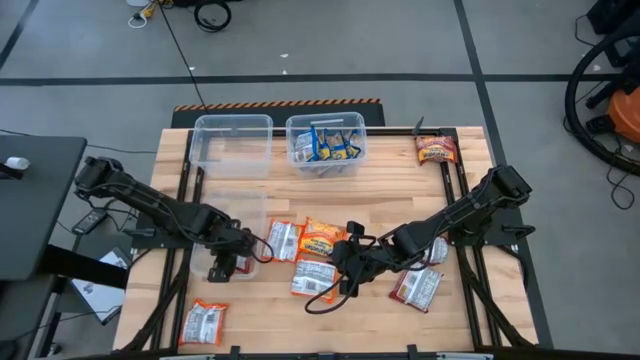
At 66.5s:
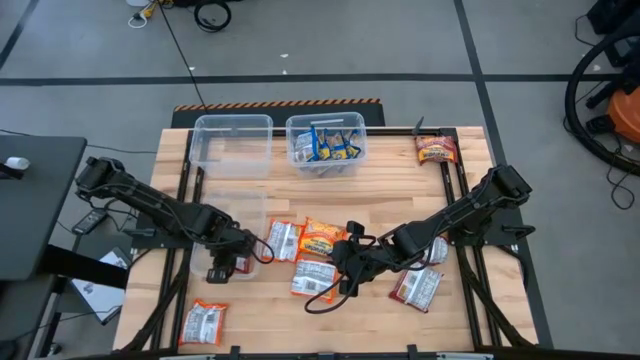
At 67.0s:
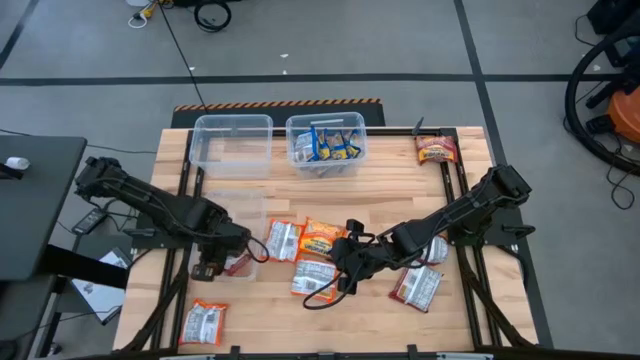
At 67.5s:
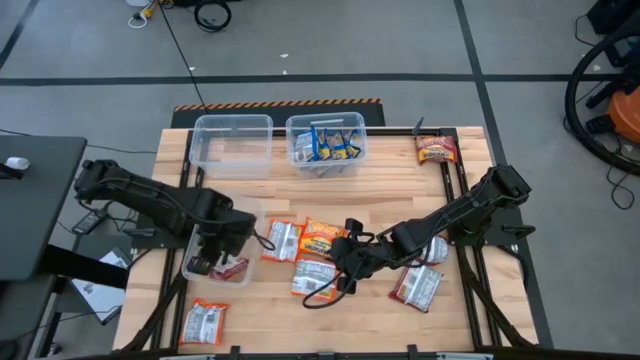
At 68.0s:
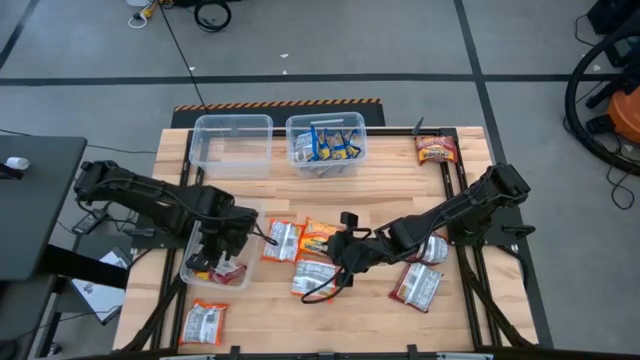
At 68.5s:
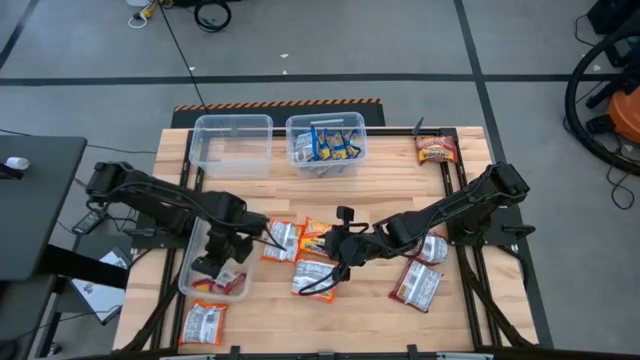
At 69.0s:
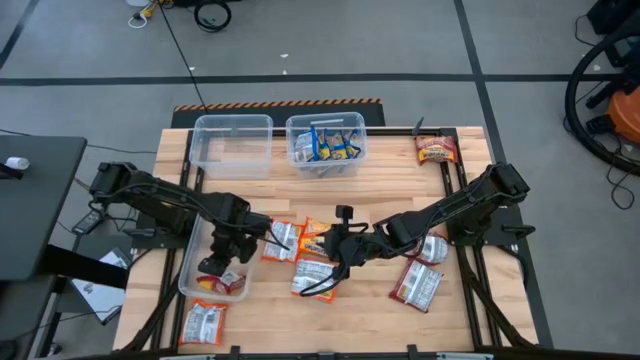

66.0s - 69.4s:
Task: Sort Maruchan noodles
Put the bottom right red noodle pack into the bottom left transparent bin

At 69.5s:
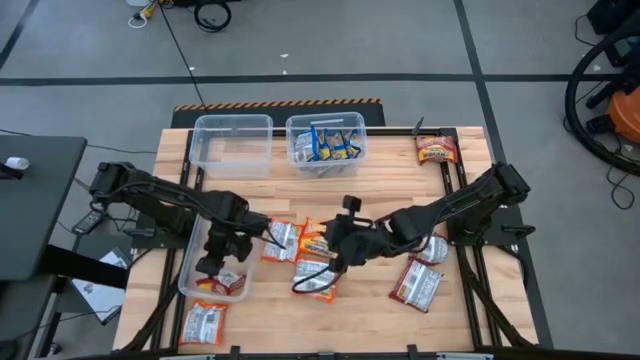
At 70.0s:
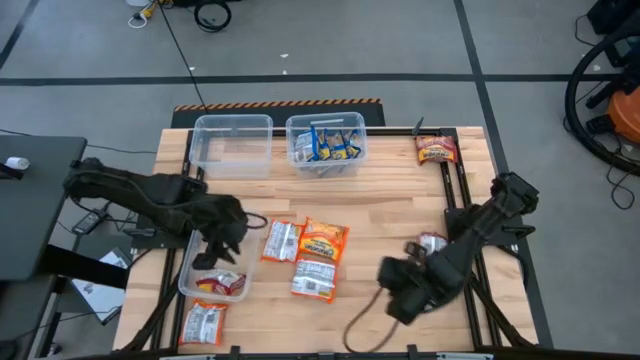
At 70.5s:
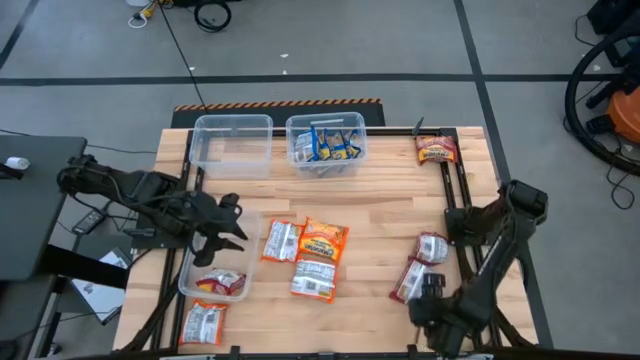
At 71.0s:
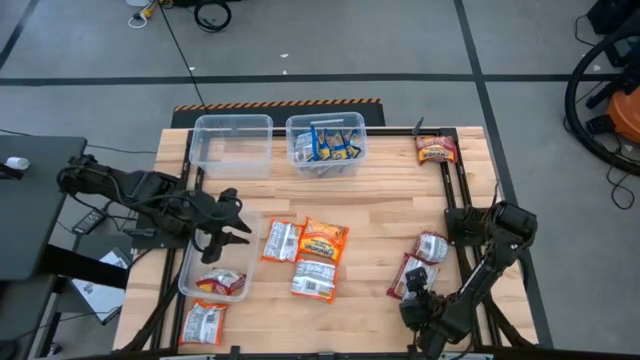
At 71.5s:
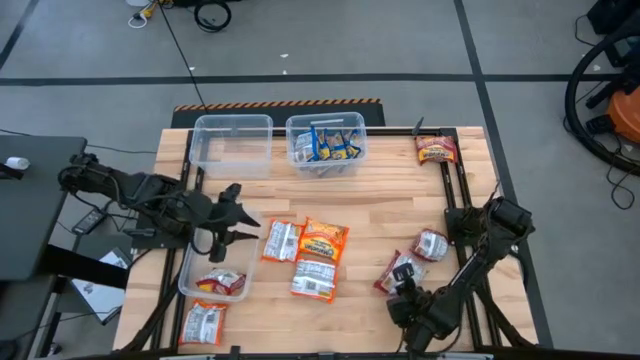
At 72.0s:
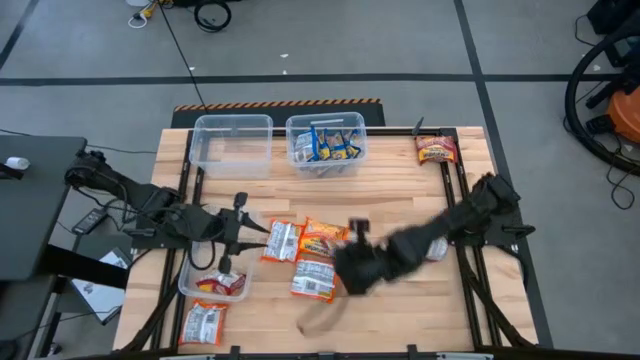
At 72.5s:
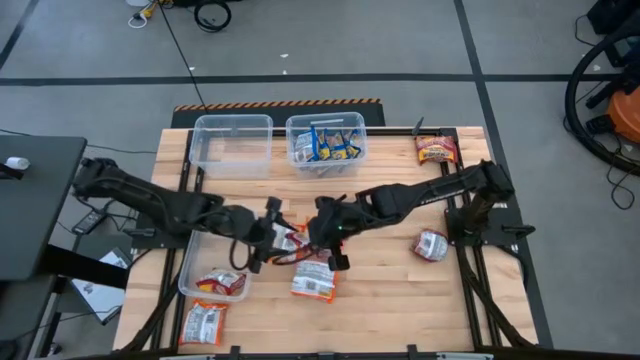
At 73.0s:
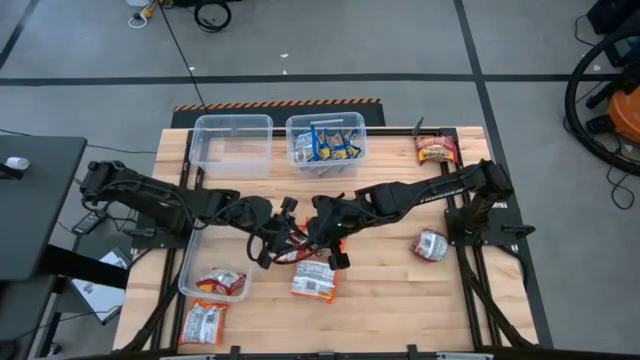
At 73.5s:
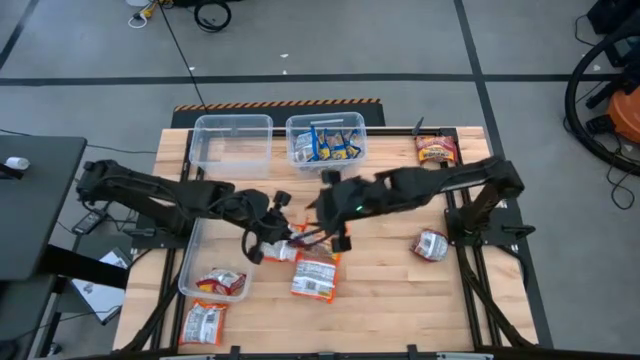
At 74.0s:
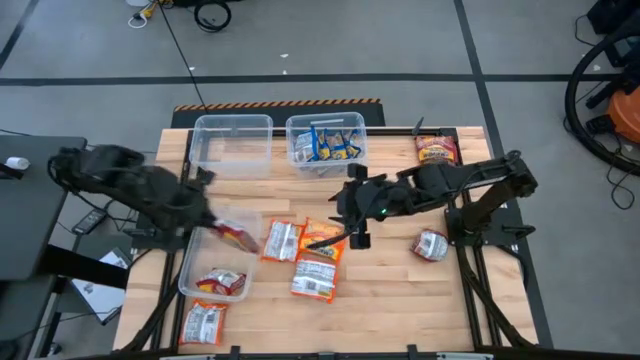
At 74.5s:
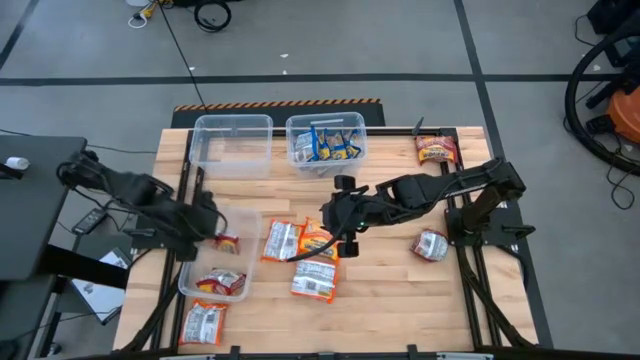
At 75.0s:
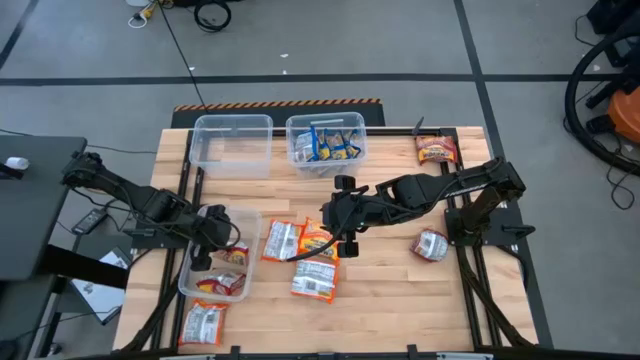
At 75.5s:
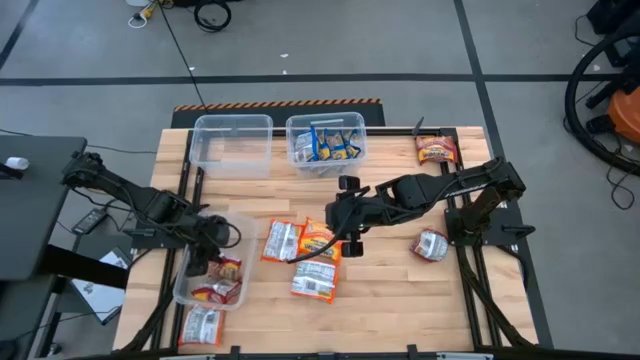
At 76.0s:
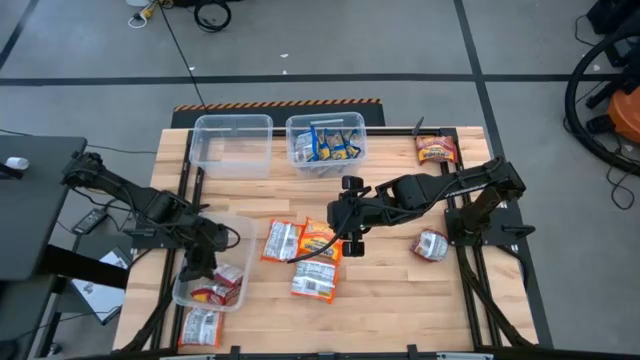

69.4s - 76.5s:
Put the bottom red noodle pack into the bottom left transparent bin

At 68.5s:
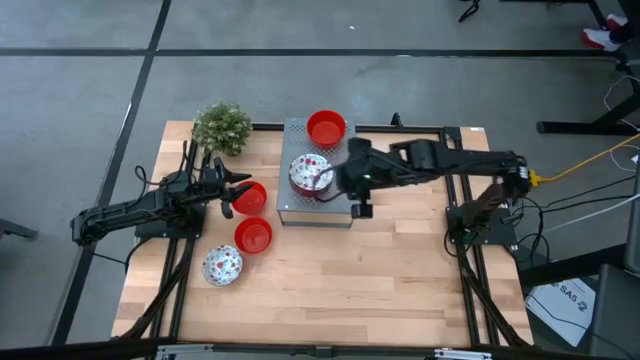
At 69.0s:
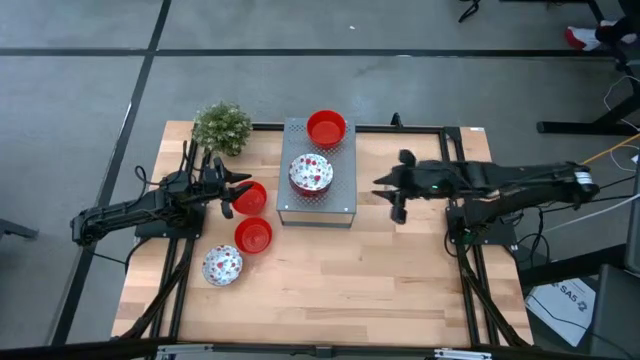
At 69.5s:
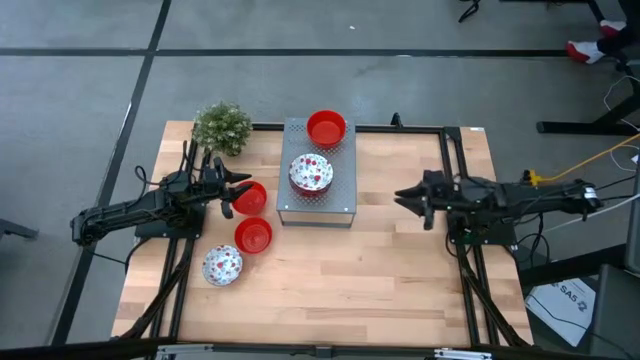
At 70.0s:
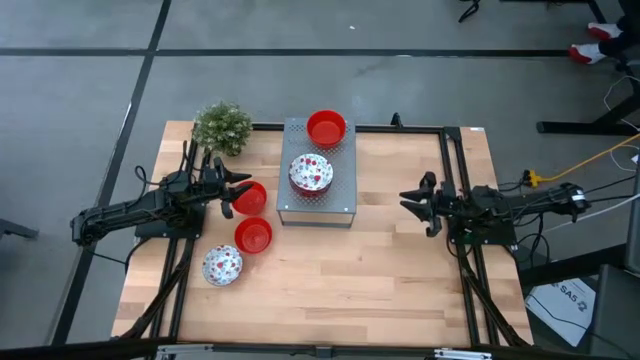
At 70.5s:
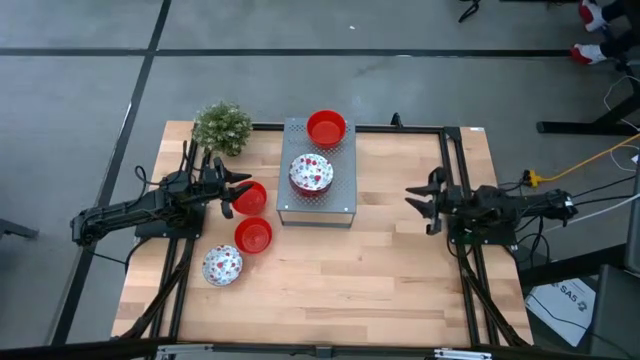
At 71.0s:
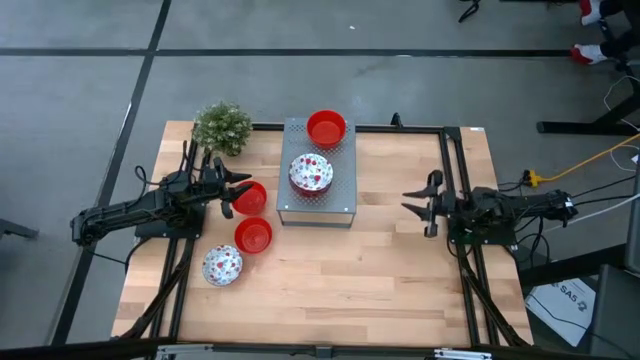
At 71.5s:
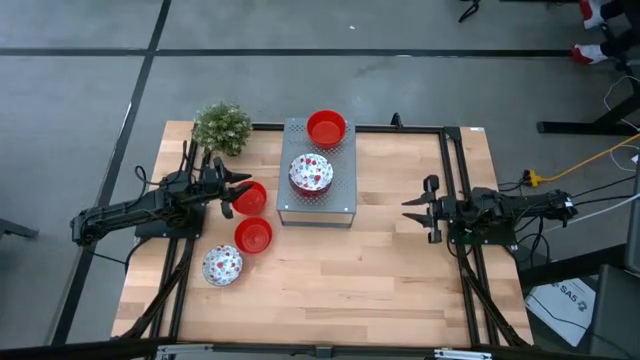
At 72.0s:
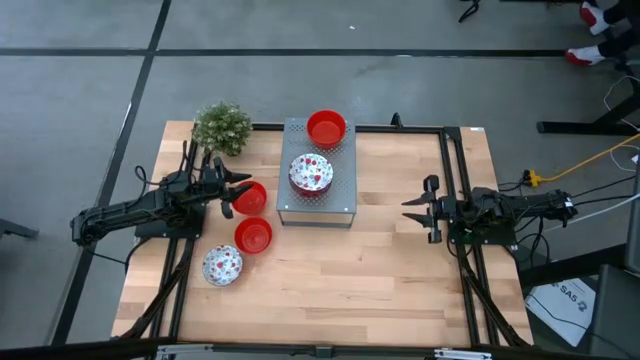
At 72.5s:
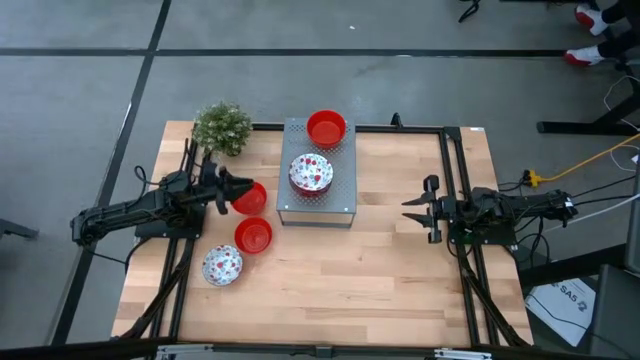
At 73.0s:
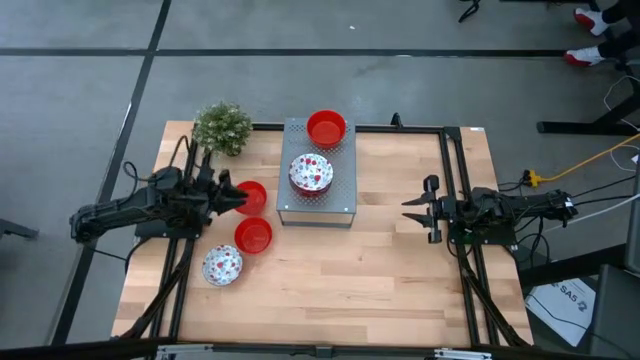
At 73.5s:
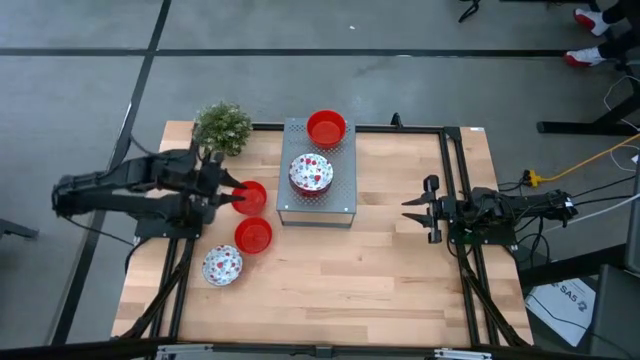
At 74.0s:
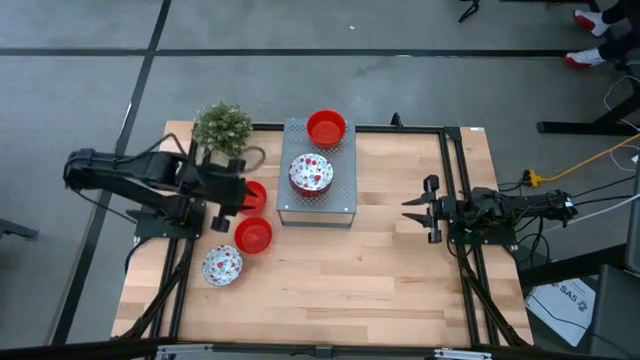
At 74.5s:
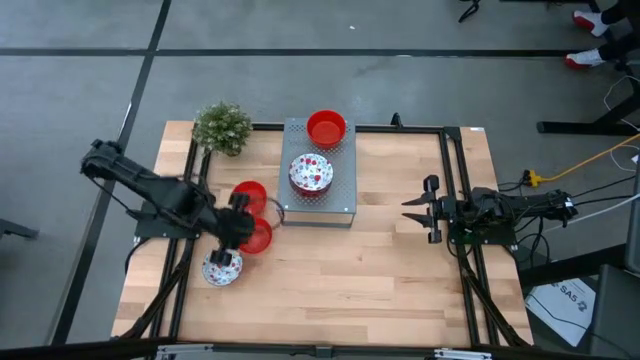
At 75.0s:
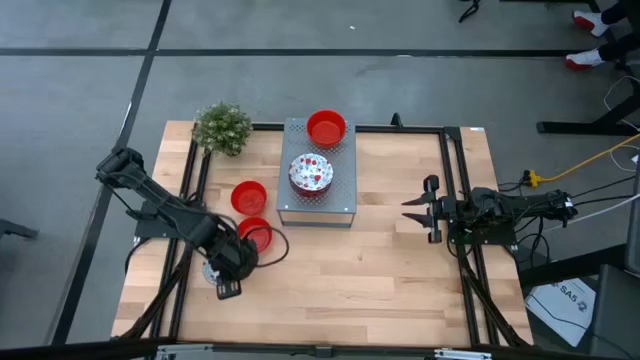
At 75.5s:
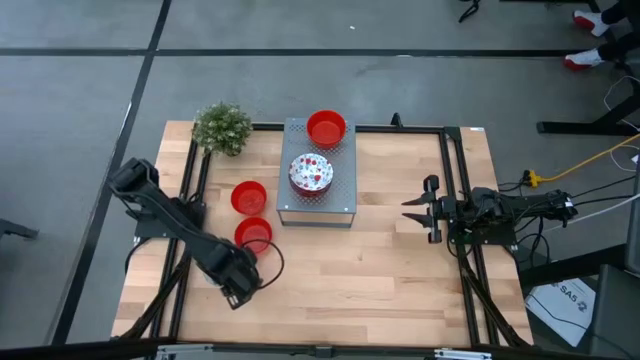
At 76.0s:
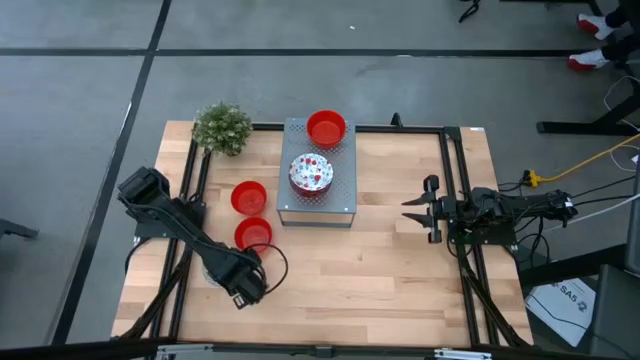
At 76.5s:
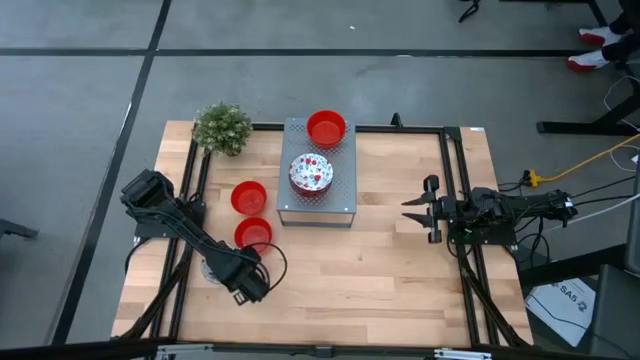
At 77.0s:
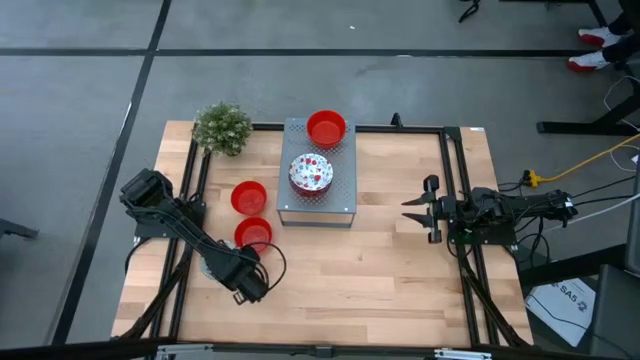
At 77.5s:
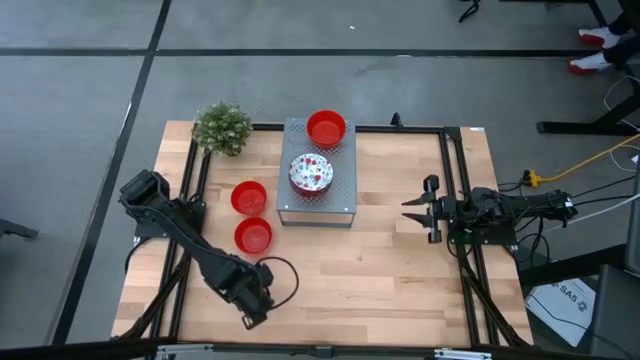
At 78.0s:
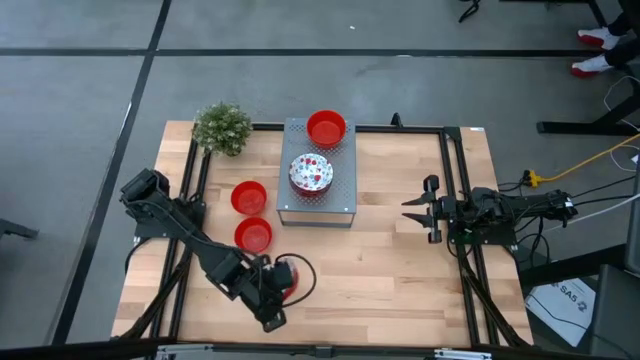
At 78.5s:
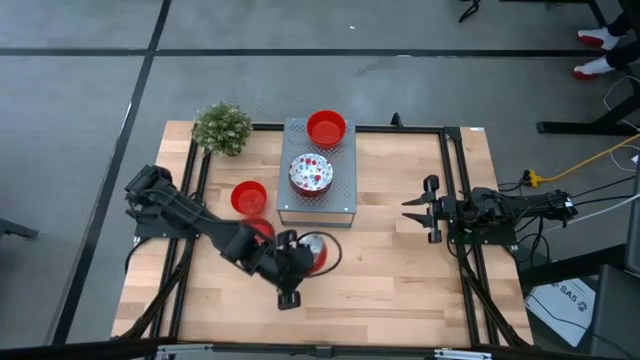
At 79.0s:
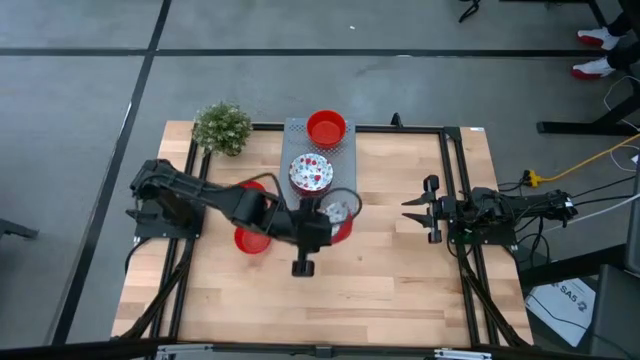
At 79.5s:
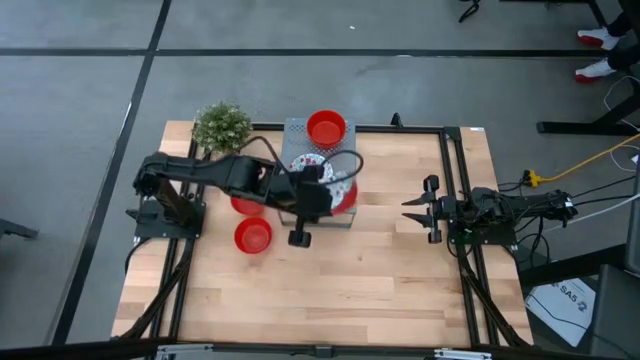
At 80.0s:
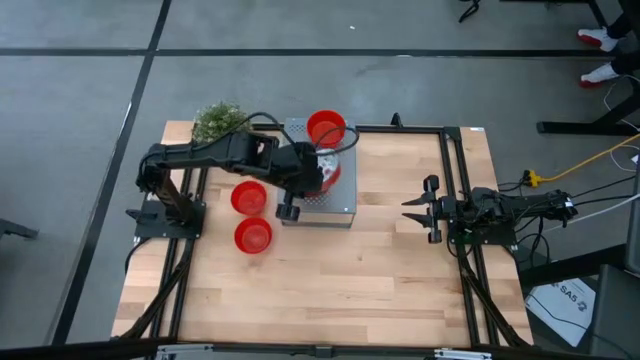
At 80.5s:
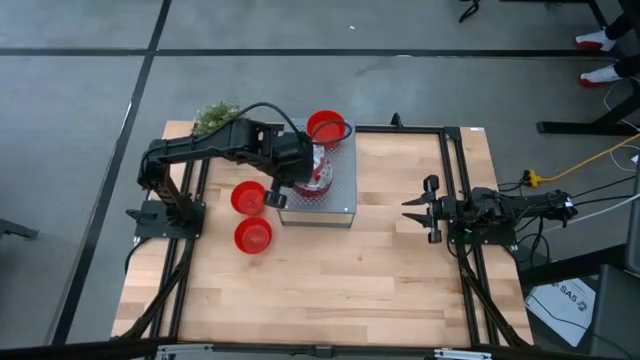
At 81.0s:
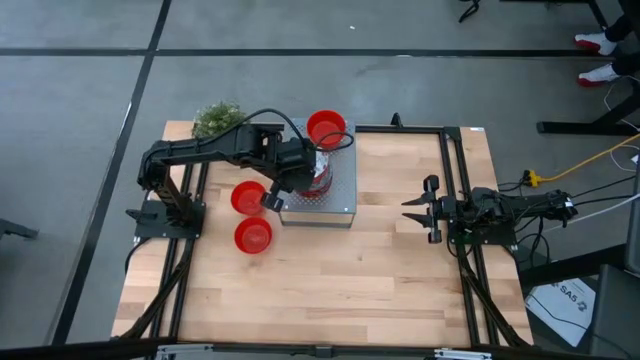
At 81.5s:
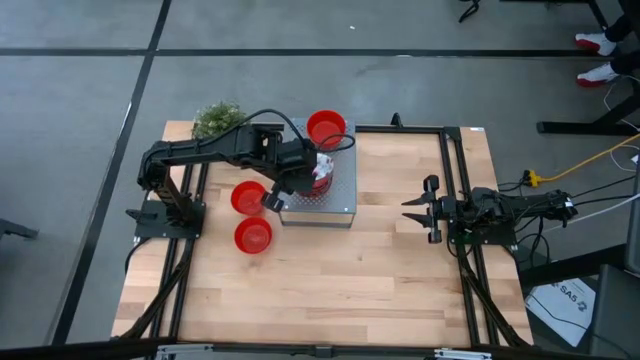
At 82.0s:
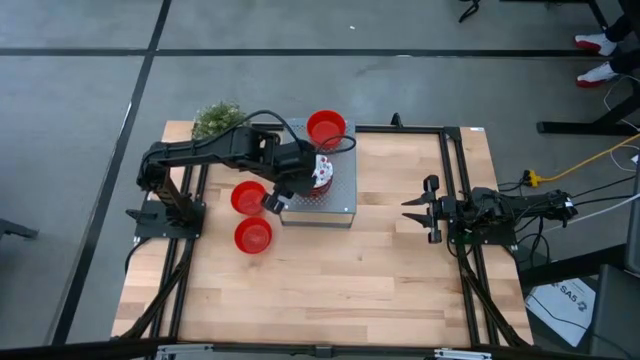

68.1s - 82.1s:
Task: Pick & Place Mini bowls
Stack the white patterned bowl on the white patterned bowl on the shelf
